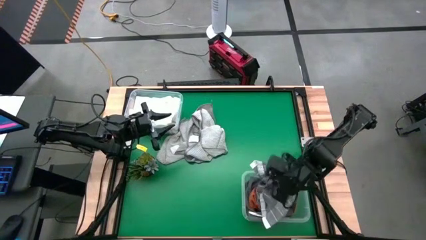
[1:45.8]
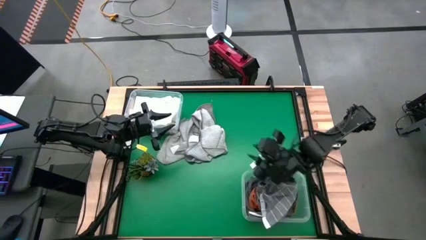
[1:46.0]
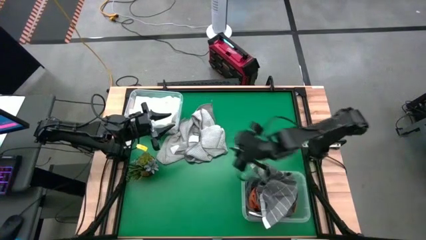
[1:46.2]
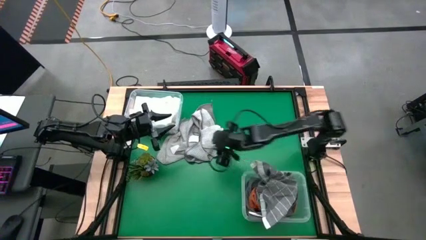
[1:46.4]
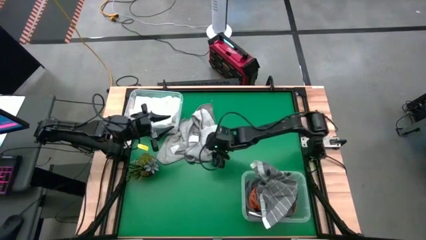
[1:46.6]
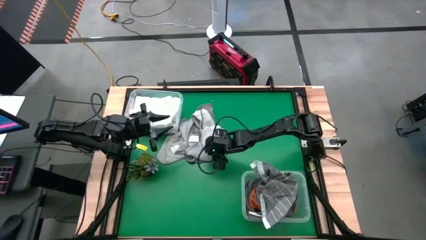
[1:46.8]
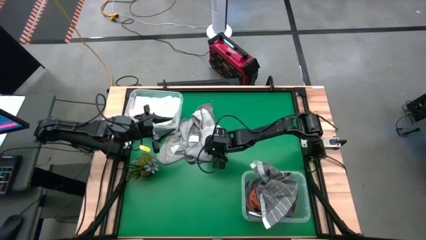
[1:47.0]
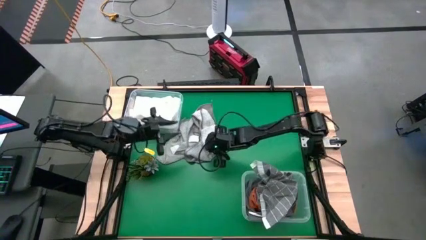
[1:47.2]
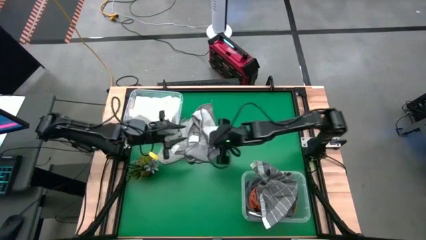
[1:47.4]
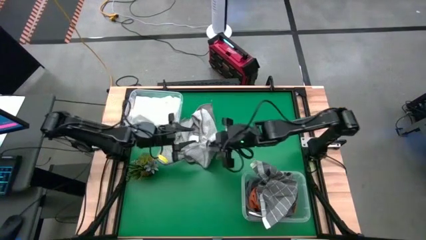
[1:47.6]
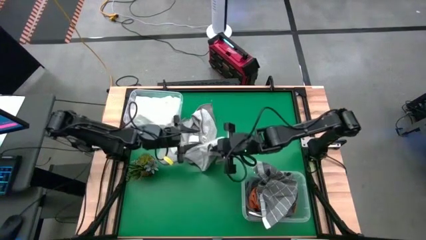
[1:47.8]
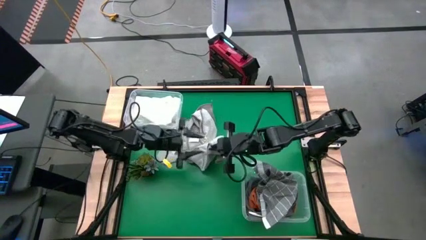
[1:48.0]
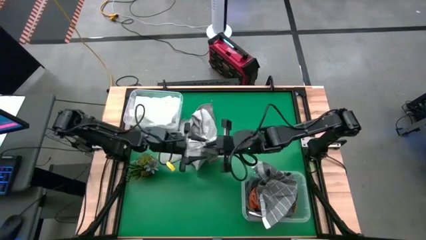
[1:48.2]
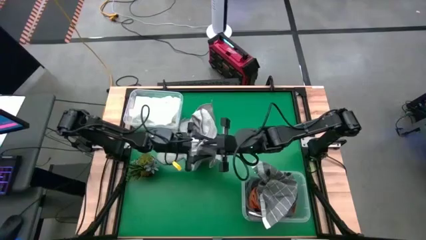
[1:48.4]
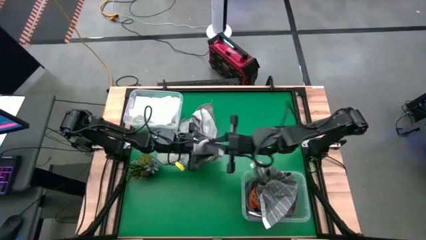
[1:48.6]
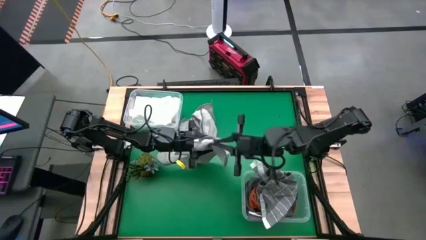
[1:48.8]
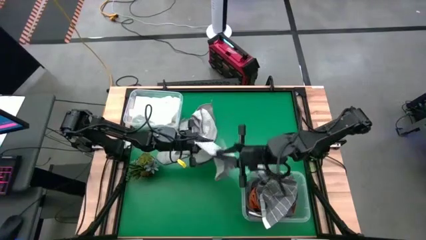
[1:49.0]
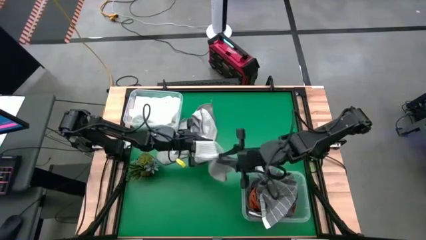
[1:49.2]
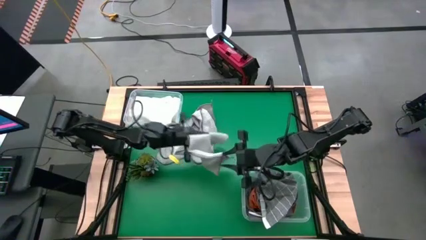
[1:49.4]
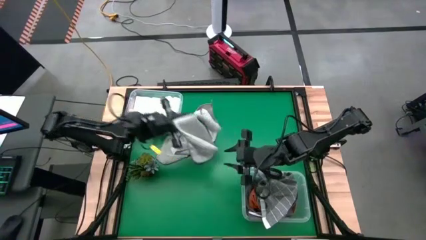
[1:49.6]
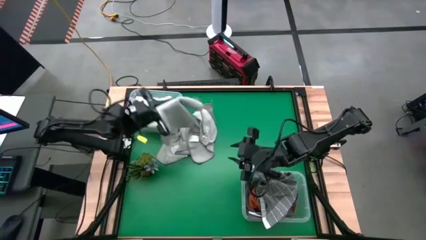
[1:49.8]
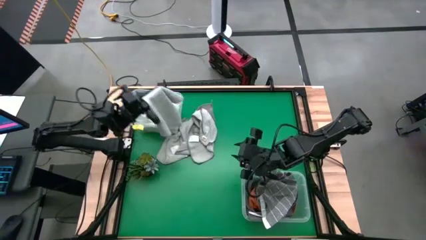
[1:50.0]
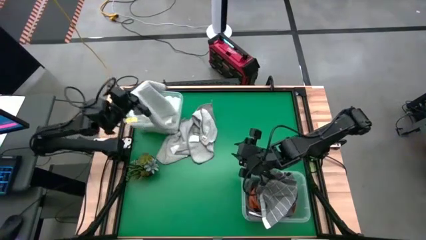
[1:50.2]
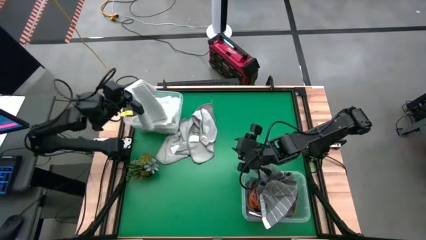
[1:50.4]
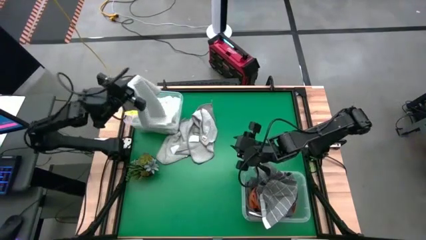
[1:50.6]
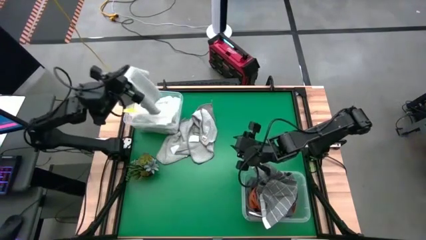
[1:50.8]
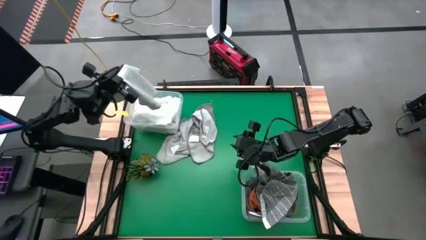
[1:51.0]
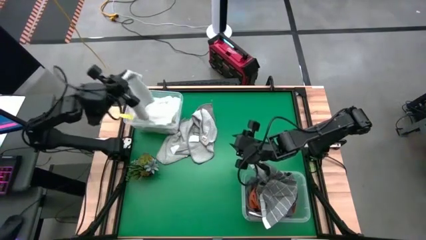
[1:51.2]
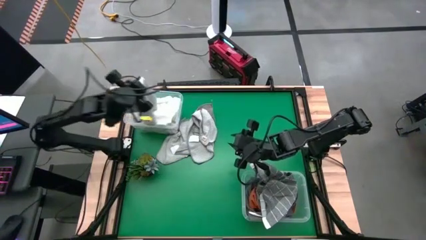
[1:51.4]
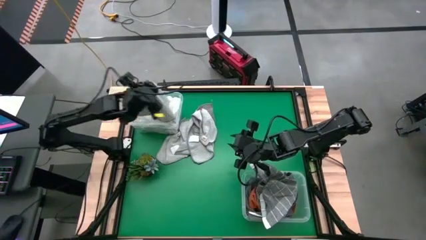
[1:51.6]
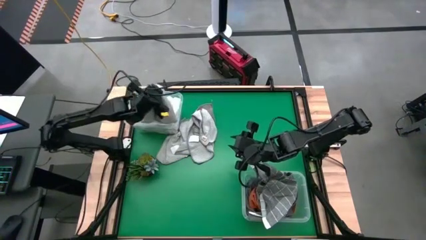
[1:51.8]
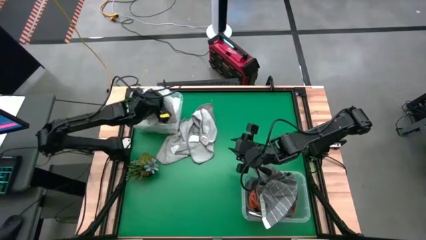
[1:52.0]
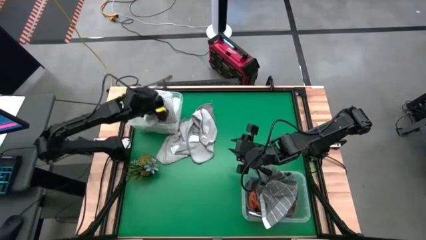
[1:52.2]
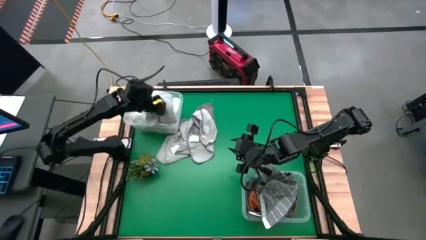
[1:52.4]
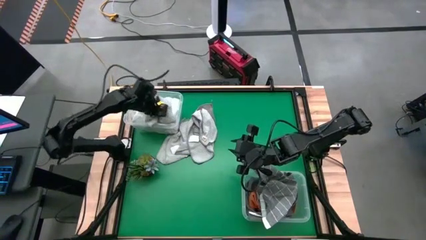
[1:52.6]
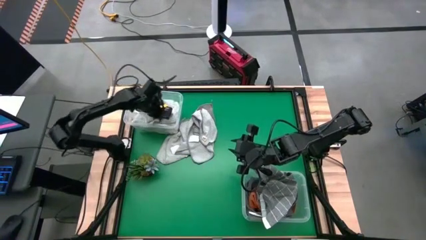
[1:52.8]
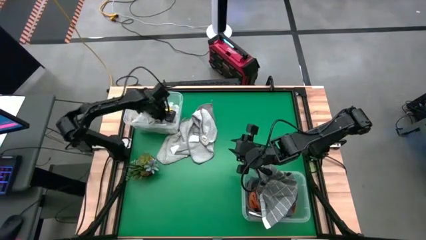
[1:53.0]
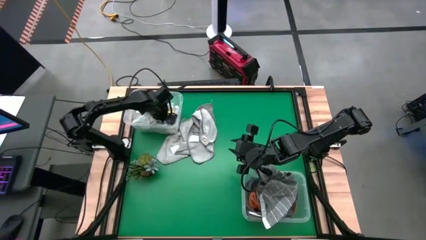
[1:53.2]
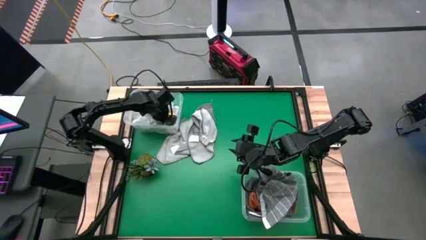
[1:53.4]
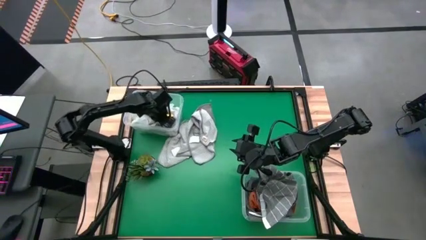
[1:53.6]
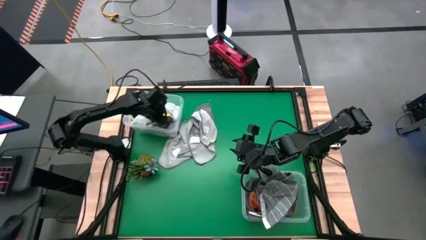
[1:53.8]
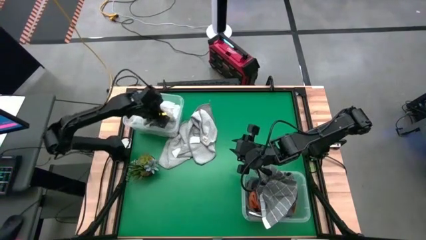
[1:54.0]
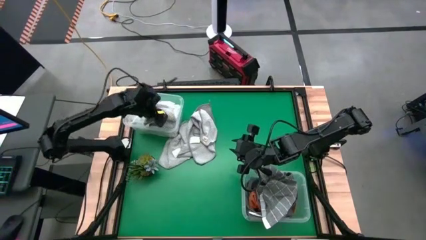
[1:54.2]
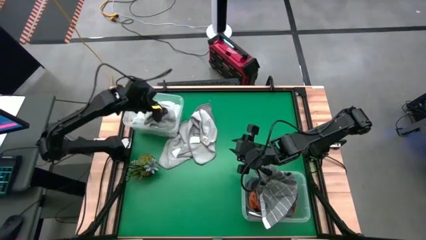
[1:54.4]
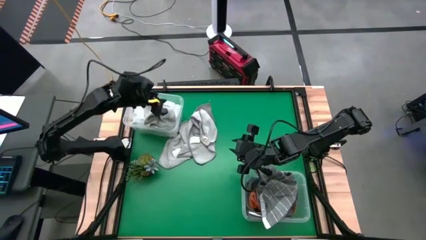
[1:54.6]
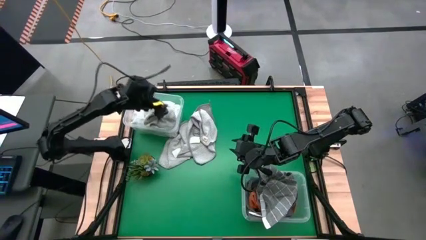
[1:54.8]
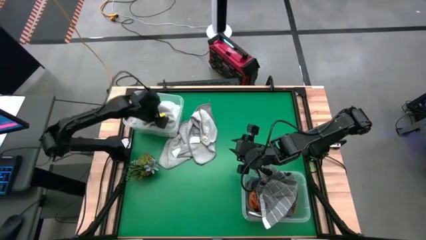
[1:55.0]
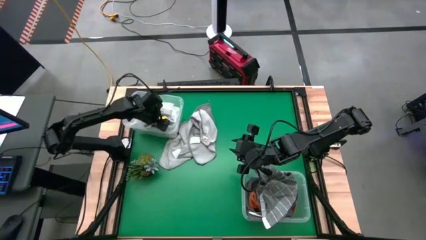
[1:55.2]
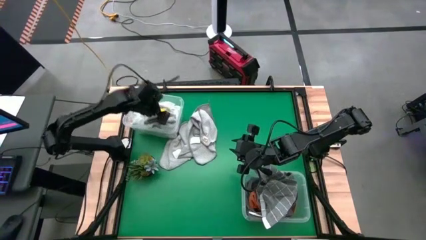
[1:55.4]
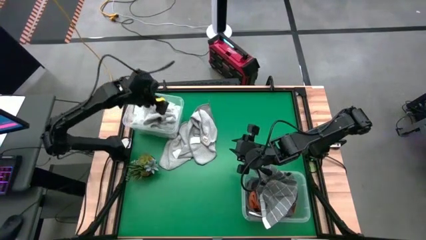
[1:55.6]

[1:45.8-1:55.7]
Task: Sort towels by color in basket
Put the light gray towel into the top transparent bin

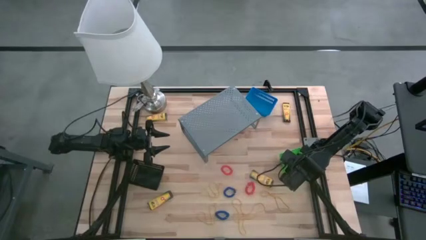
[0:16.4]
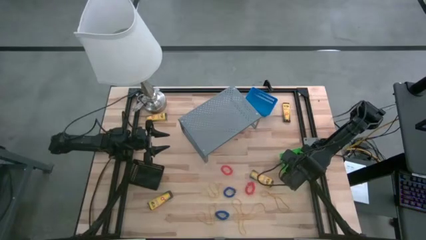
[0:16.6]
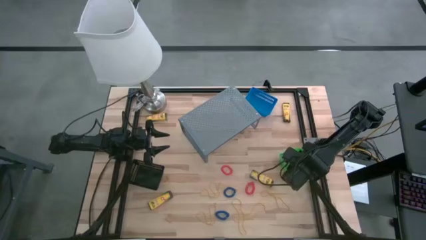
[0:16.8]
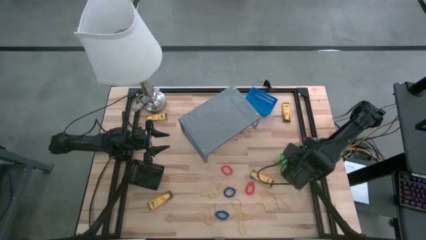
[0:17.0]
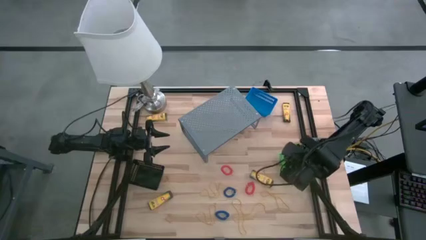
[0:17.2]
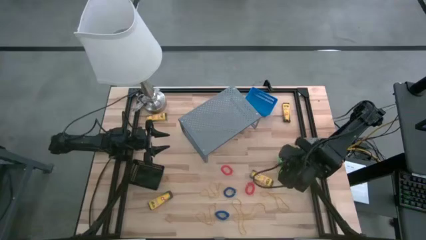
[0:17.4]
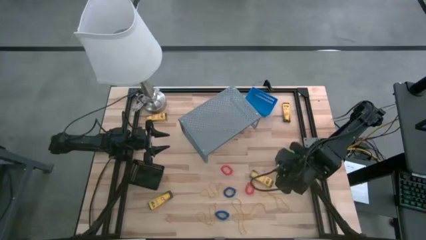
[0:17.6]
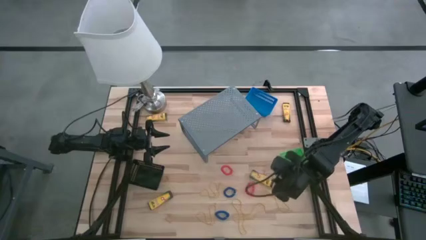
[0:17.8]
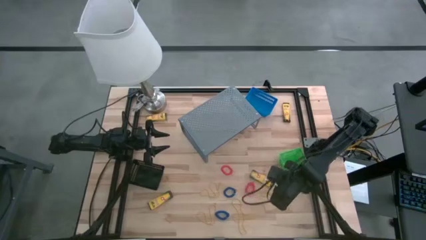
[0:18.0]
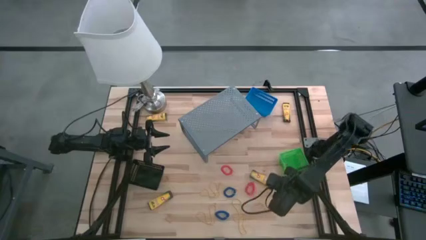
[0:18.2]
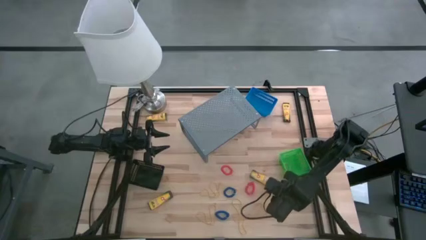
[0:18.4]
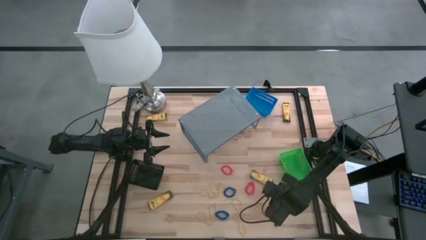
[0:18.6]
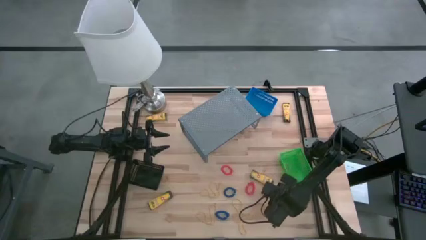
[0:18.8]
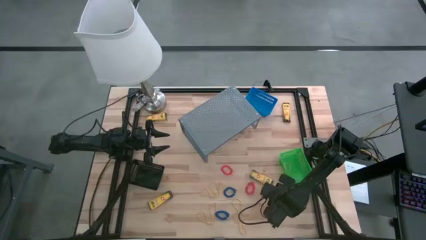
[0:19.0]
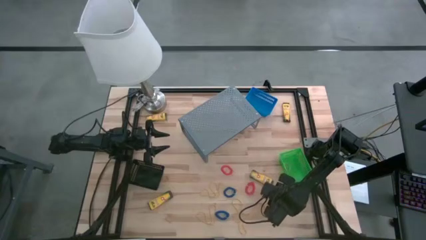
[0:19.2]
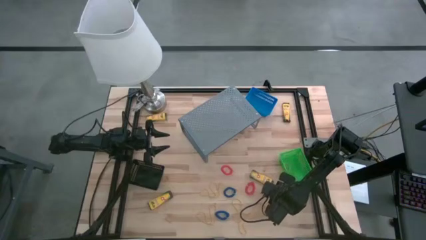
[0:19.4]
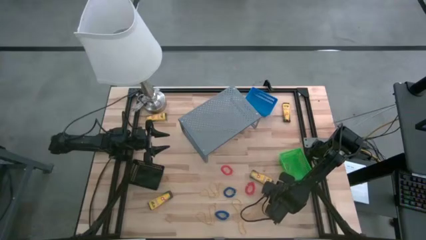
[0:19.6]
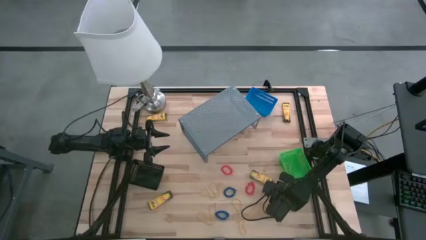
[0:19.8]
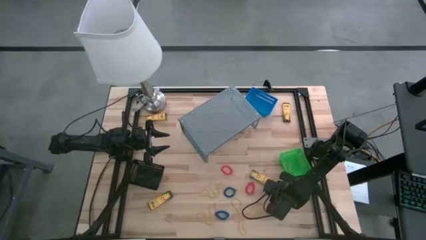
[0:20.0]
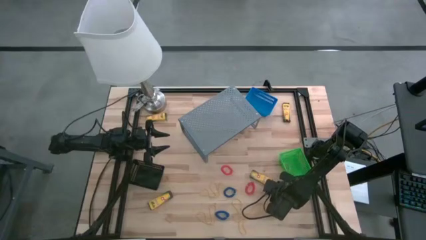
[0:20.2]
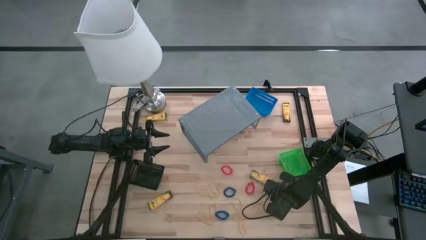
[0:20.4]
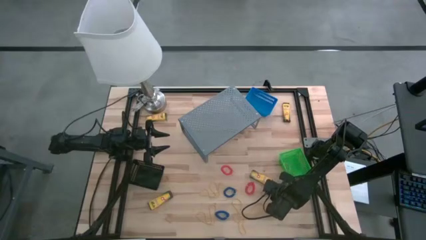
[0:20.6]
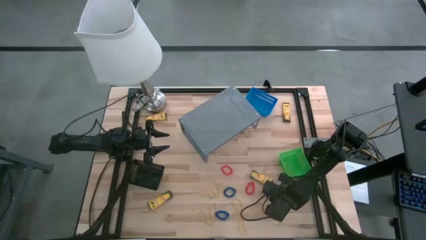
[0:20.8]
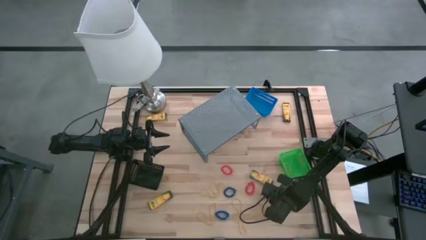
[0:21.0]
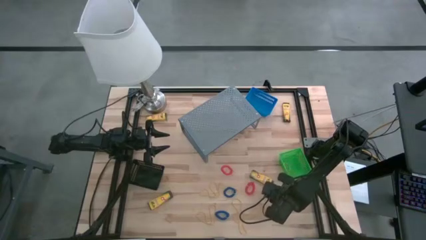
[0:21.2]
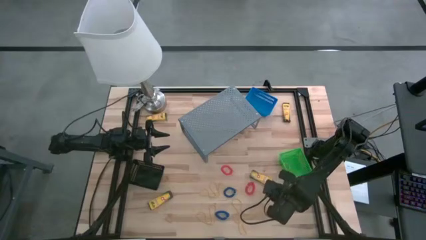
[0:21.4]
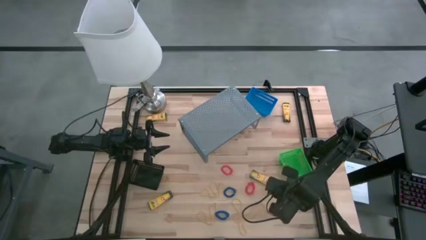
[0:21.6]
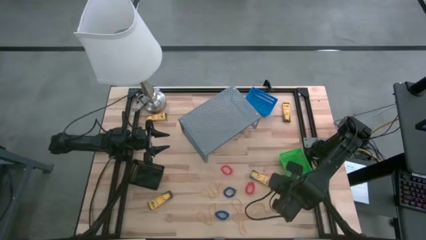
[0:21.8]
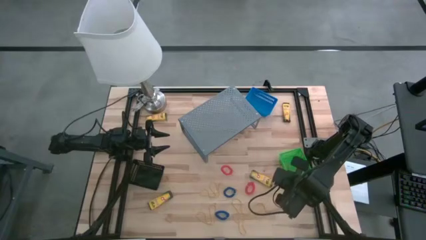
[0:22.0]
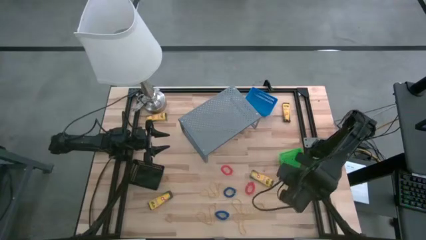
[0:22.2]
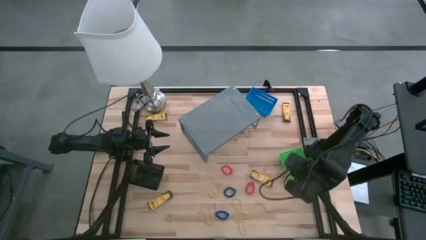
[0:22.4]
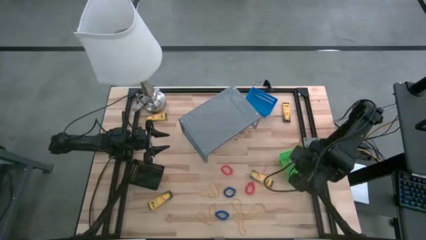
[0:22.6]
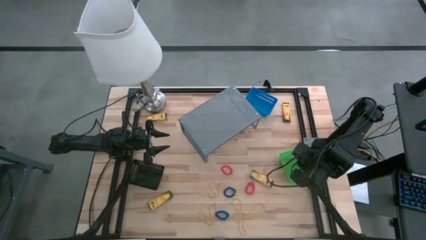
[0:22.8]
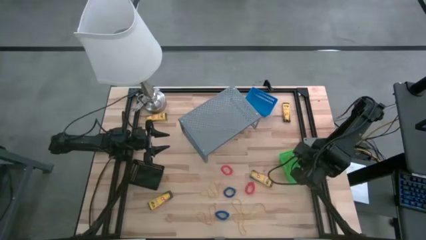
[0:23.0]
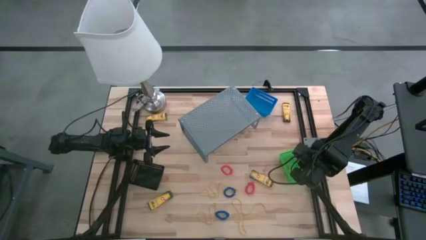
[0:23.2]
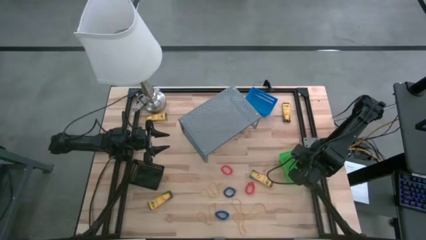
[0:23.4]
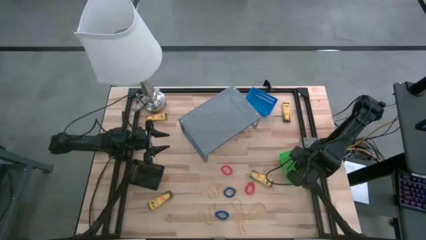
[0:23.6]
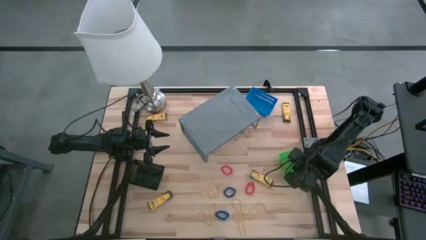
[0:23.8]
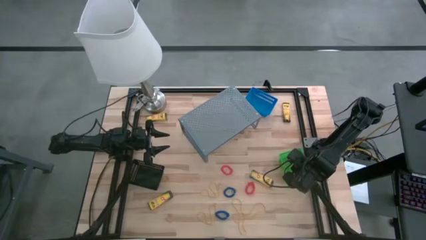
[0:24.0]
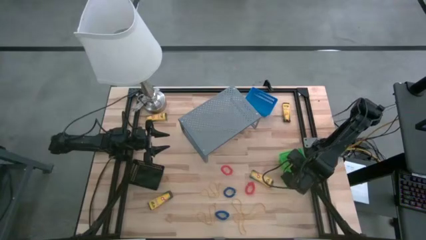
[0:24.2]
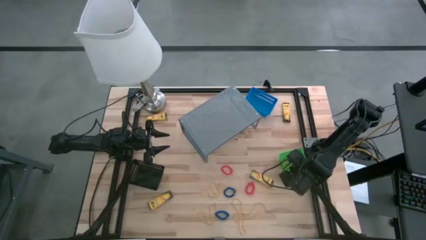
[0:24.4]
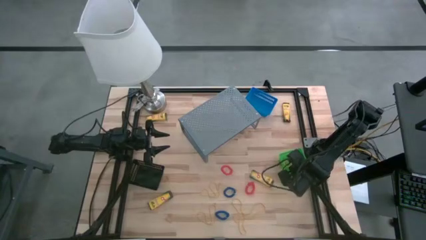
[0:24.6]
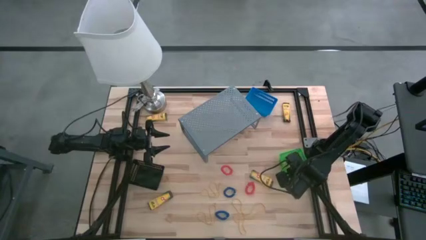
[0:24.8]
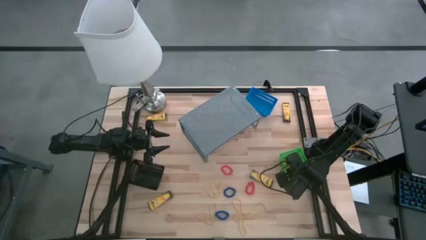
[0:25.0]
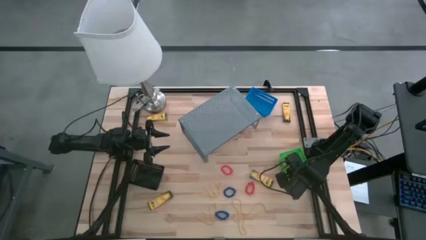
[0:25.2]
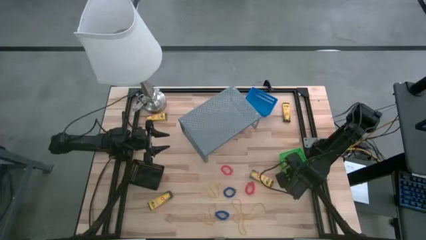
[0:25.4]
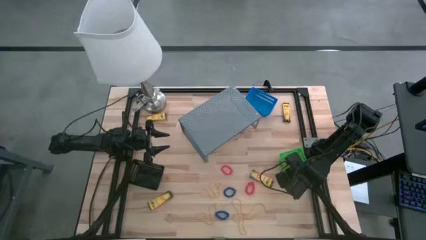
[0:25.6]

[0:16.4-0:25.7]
Task: Pick & Place Office Desk Supplies
Put the yellow rubber band into the green basket
